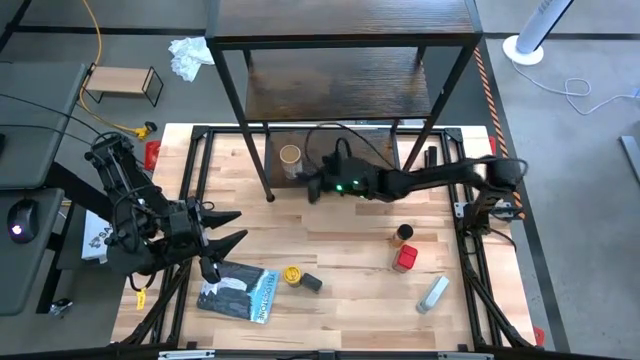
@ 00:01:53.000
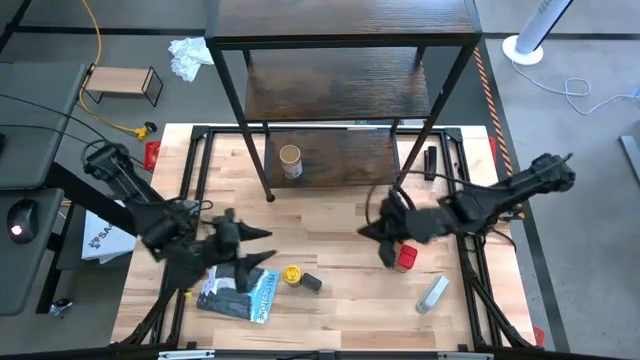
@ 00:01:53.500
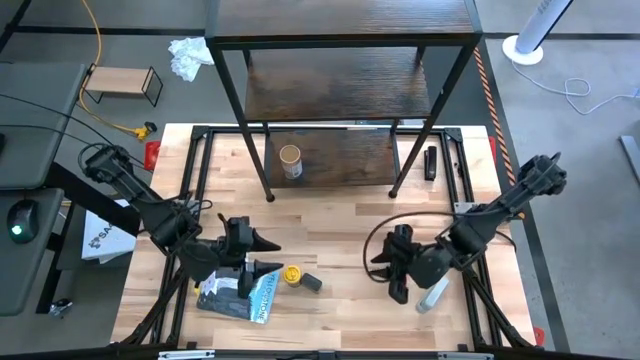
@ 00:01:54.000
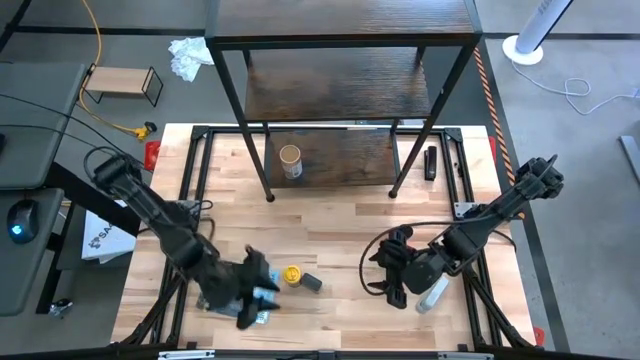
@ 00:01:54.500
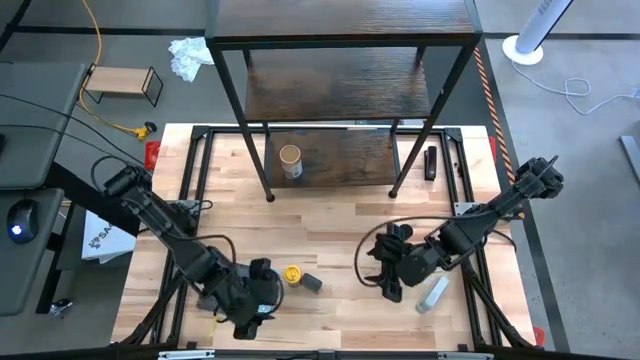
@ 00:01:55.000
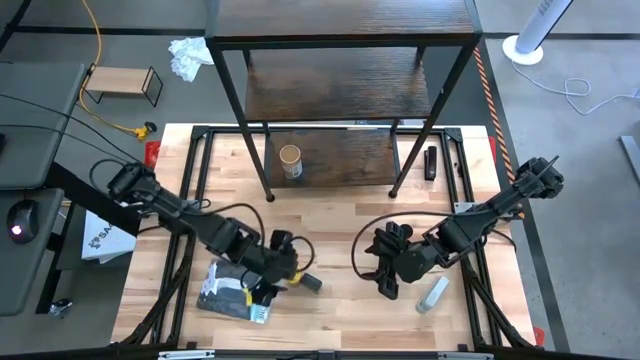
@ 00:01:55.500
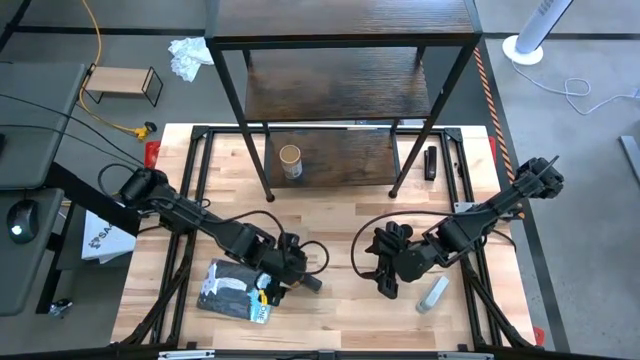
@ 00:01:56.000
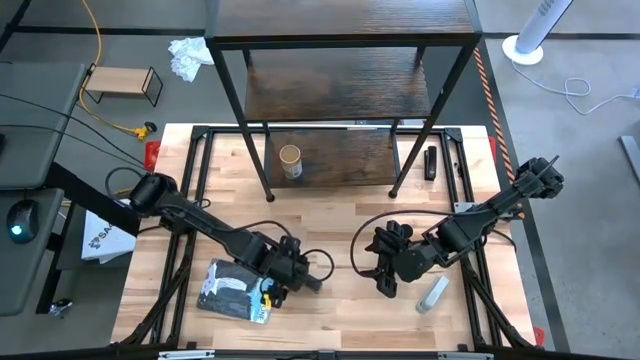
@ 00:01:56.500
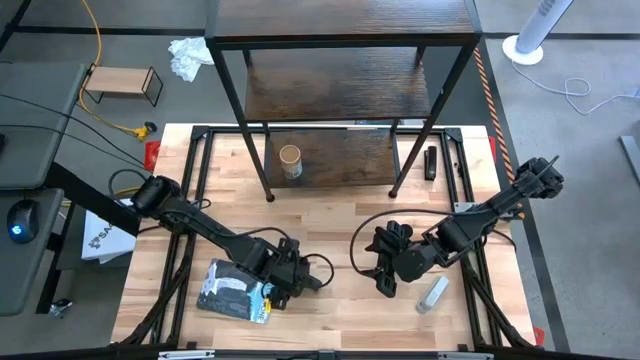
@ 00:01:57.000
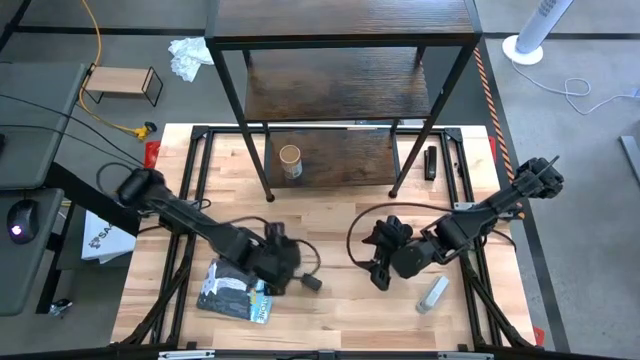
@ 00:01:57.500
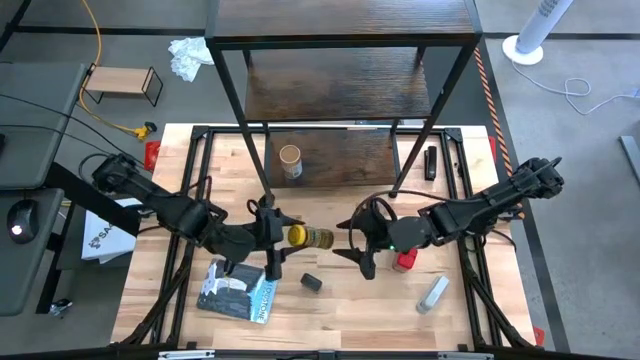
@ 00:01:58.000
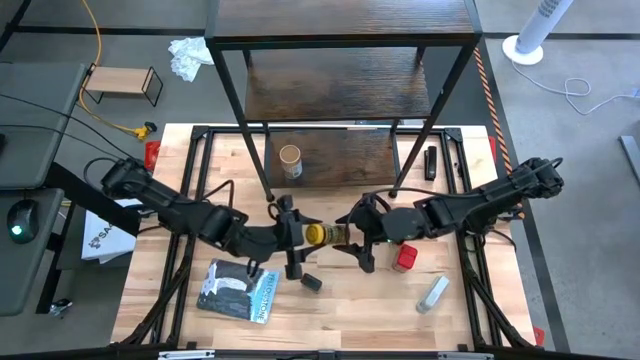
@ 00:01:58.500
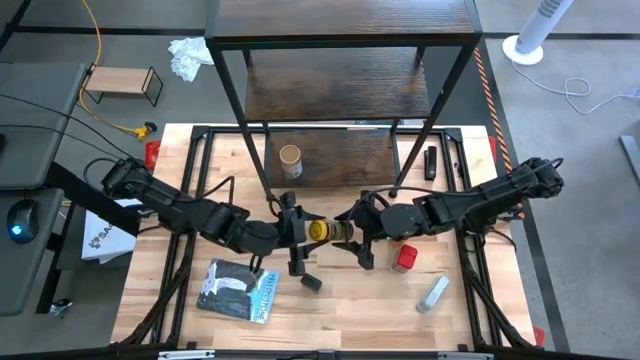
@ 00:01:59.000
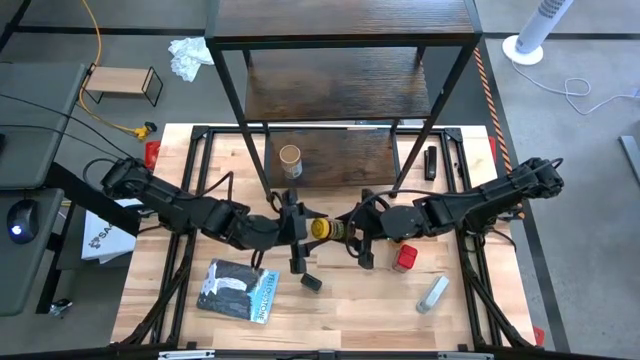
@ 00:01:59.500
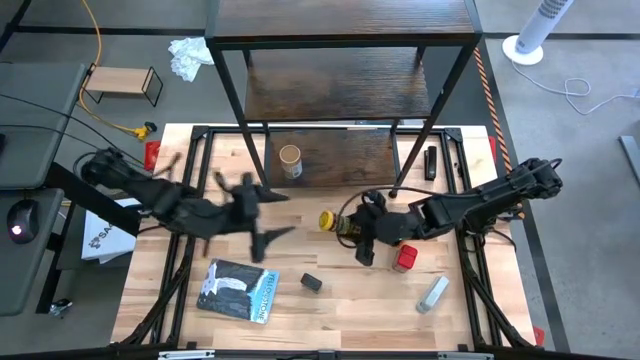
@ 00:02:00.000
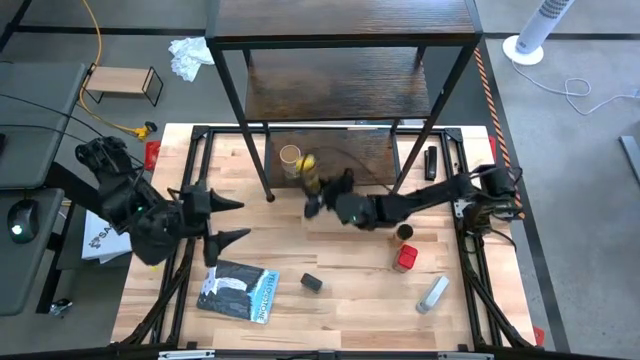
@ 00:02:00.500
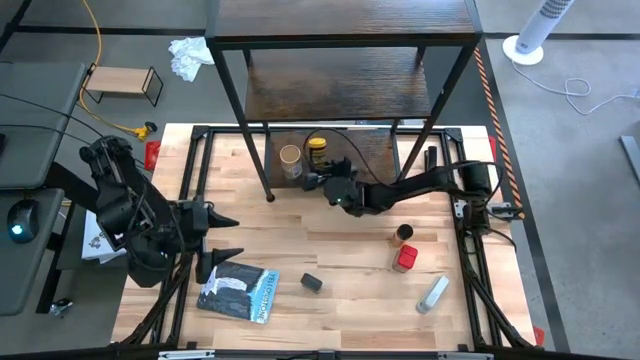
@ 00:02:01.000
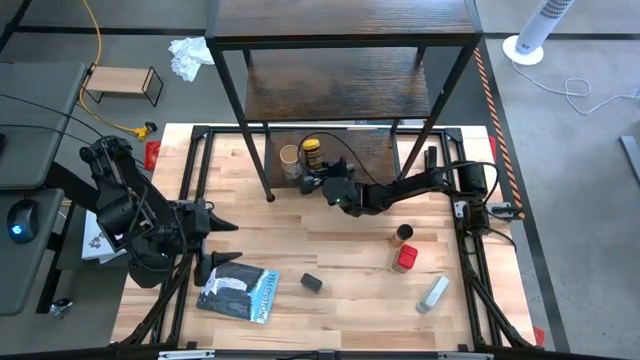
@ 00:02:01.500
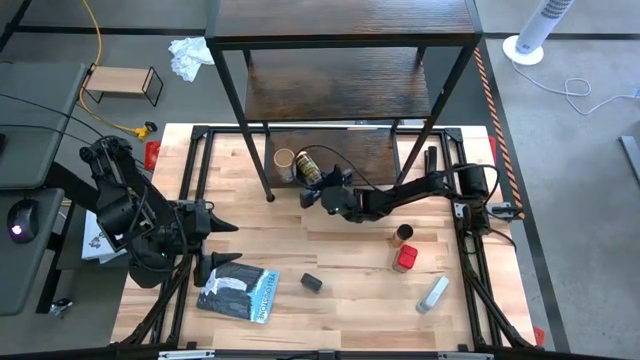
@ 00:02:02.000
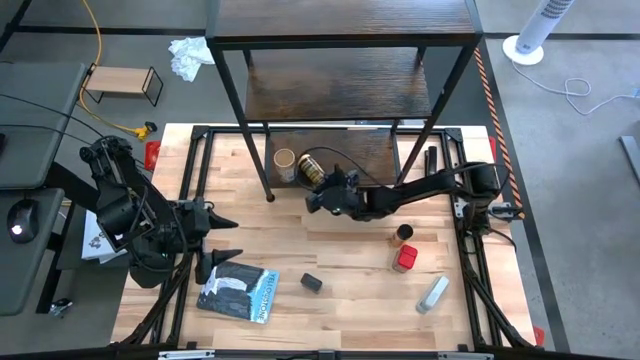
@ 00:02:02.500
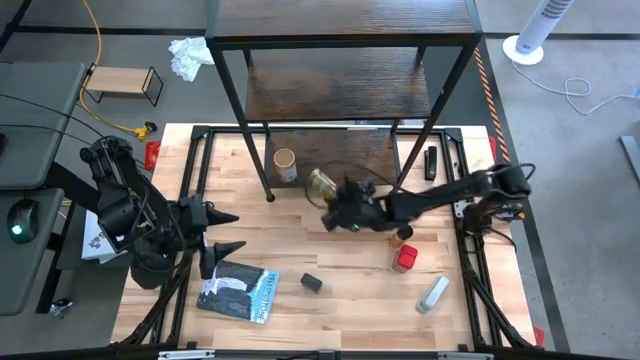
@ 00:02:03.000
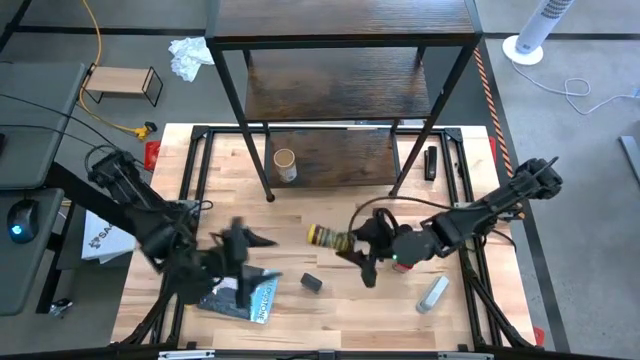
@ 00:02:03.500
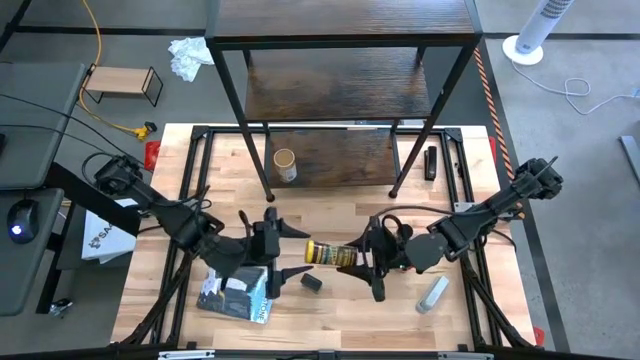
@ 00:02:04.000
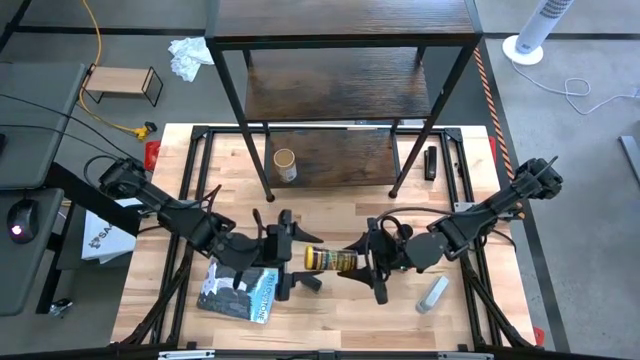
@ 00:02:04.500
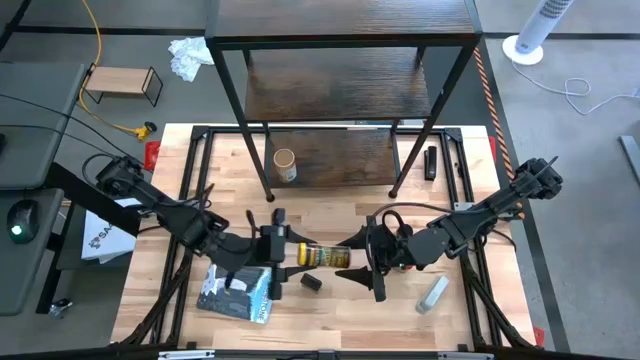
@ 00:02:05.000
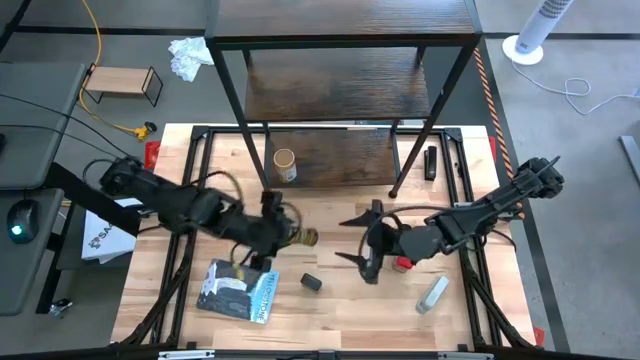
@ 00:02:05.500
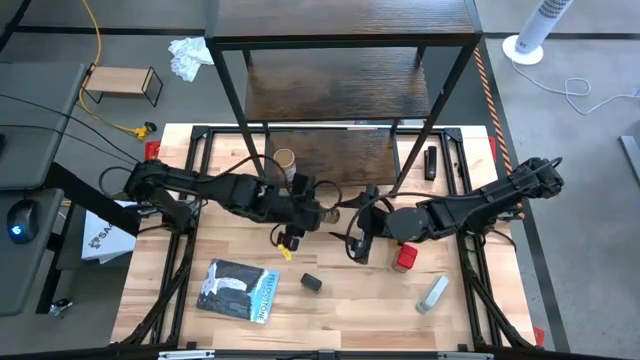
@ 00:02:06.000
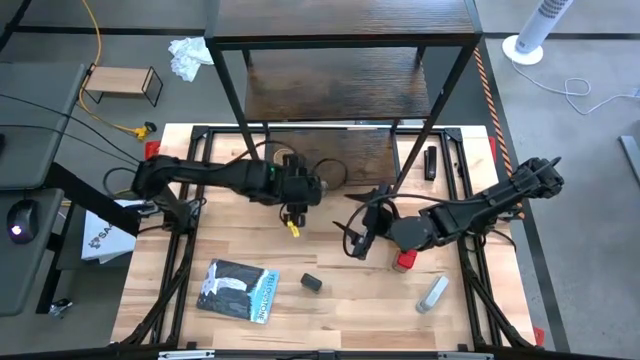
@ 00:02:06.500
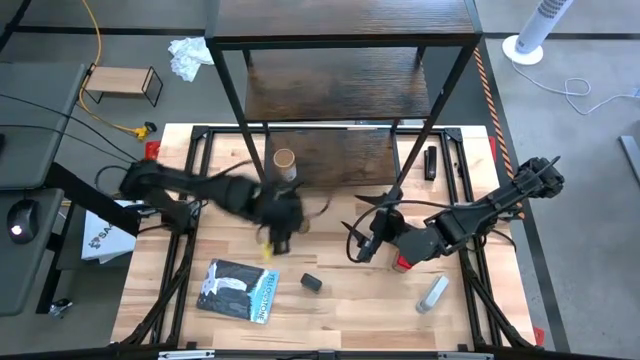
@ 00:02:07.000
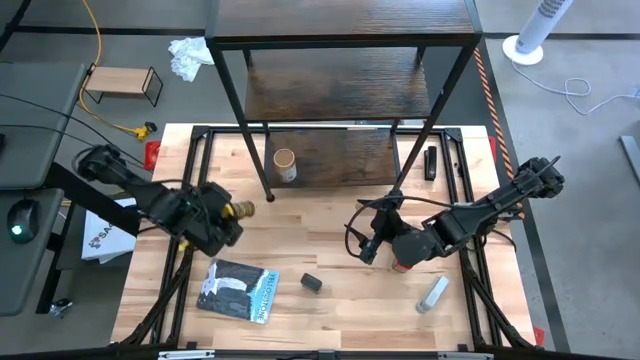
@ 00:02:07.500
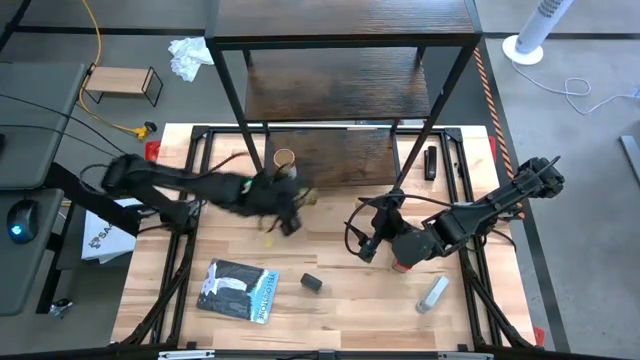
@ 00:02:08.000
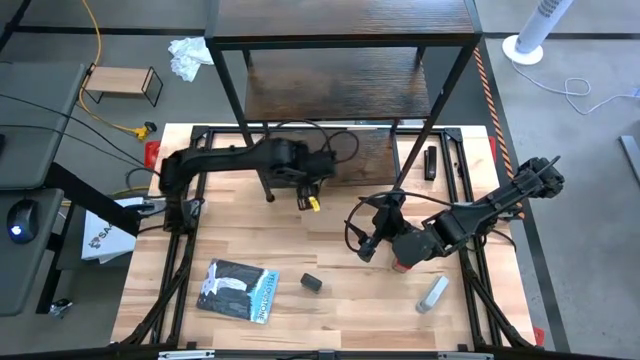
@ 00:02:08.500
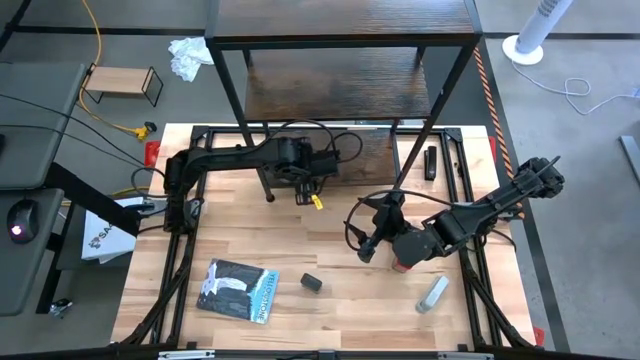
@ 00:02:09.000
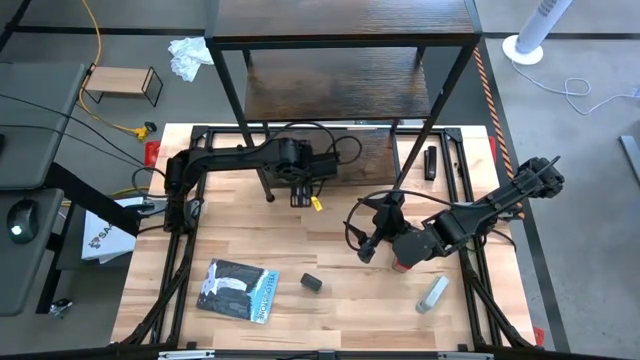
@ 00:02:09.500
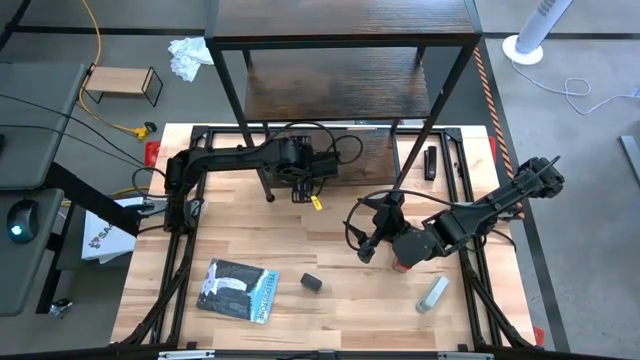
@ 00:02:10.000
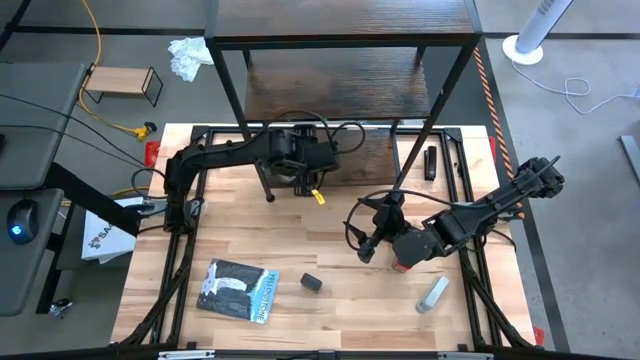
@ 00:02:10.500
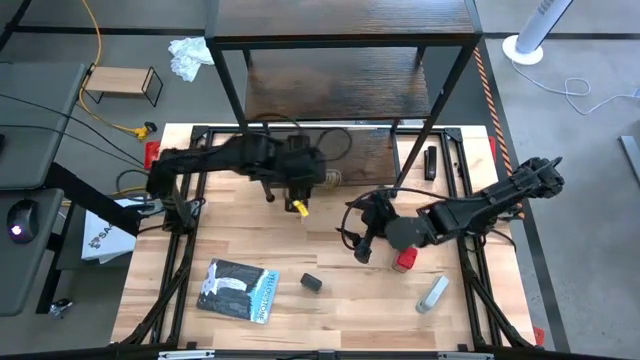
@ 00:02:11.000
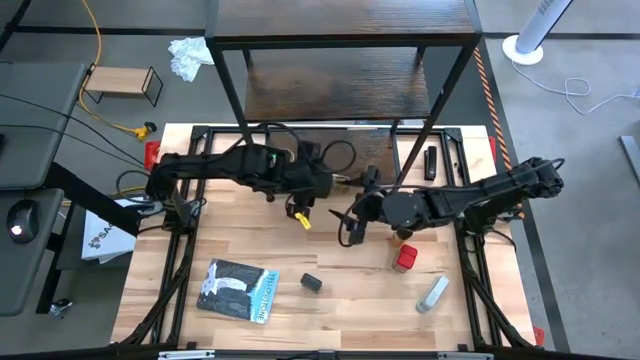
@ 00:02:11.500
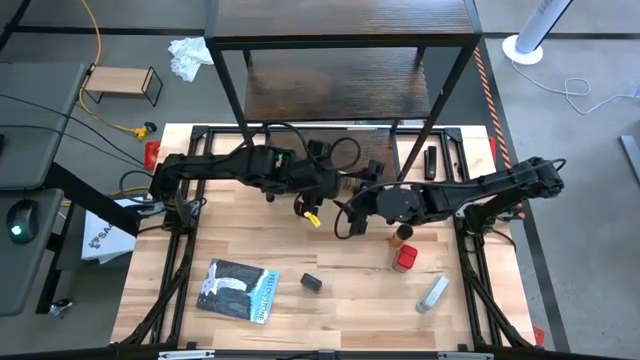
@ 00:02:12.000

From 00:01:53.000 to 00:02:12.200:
Task: Shelf spices
Put the yellow seasoning bottle on the shelf
